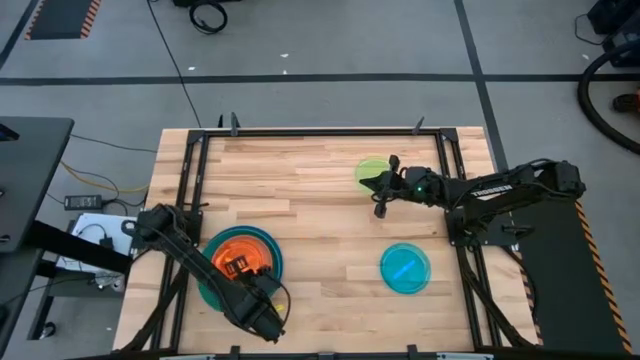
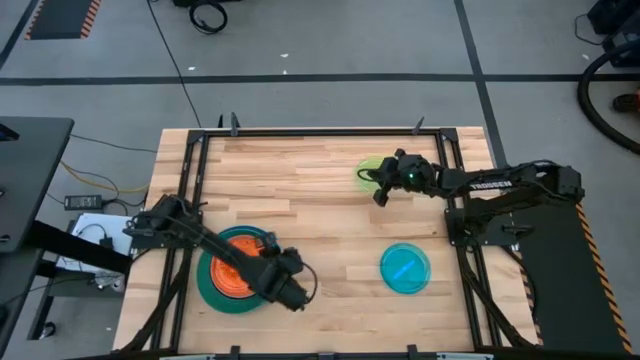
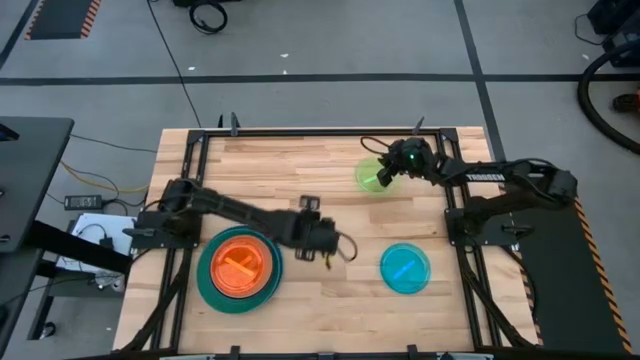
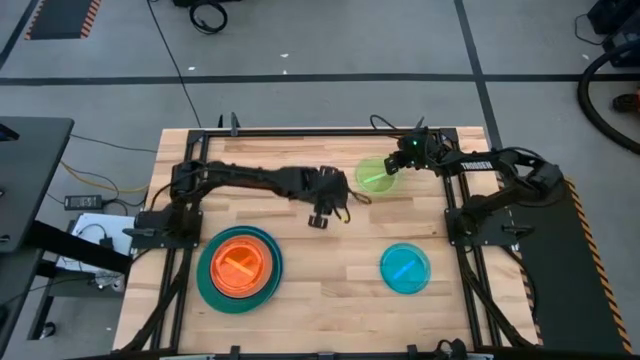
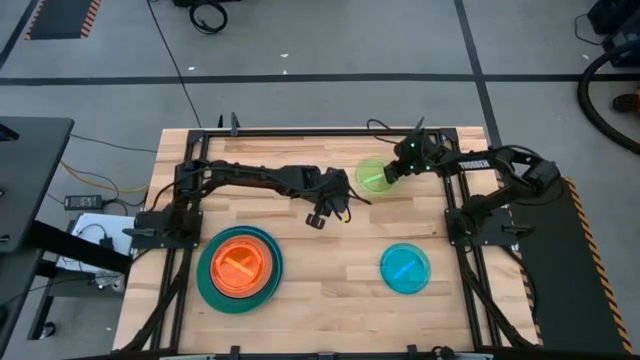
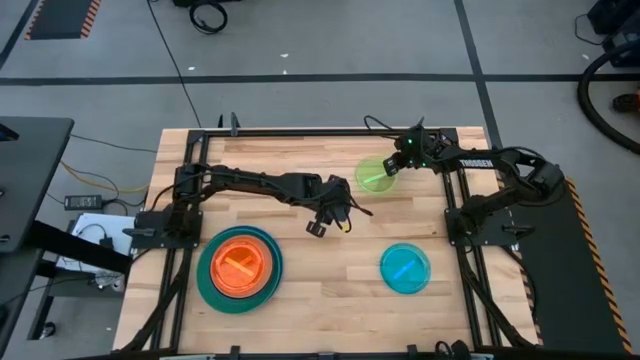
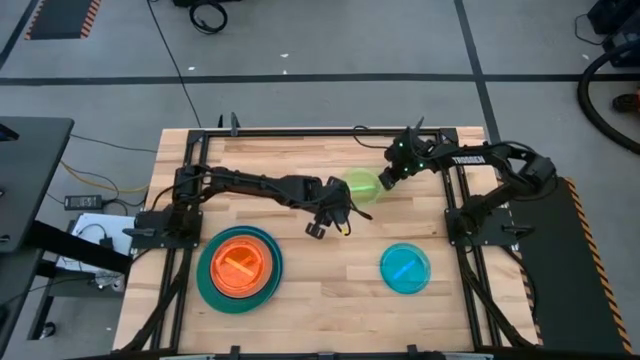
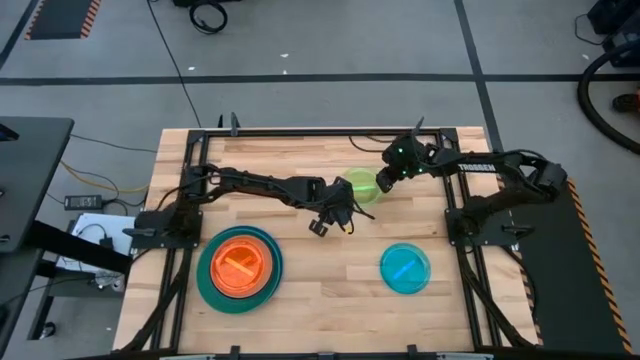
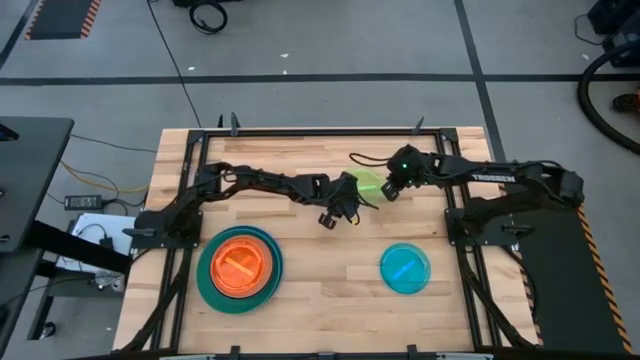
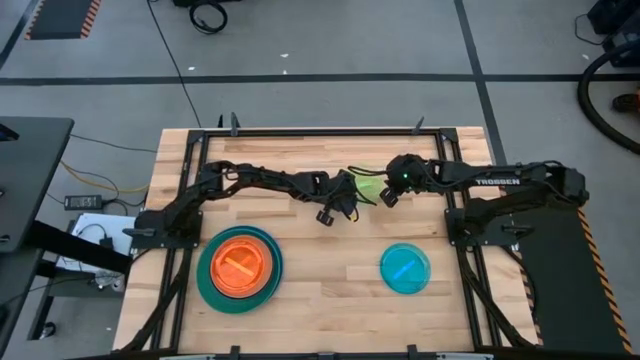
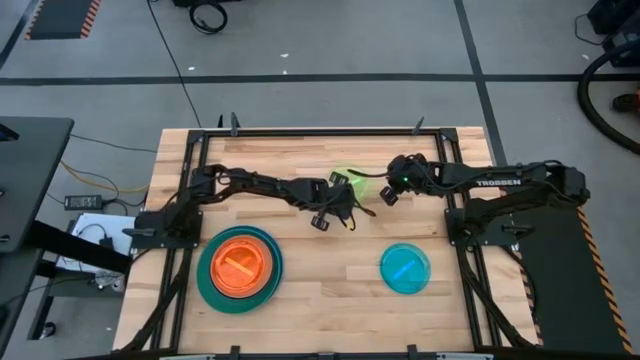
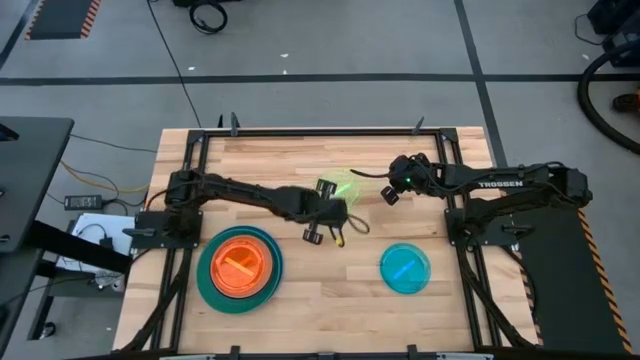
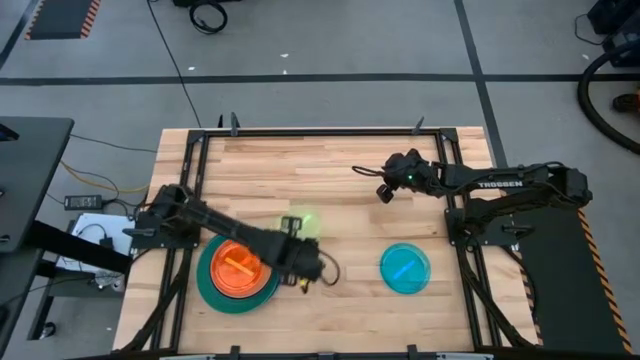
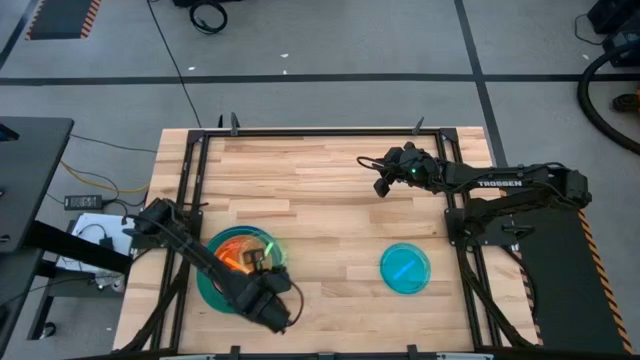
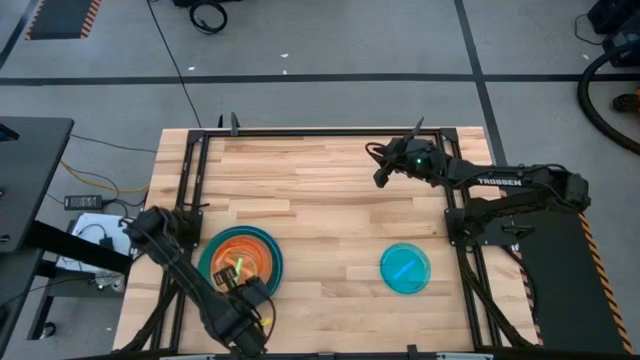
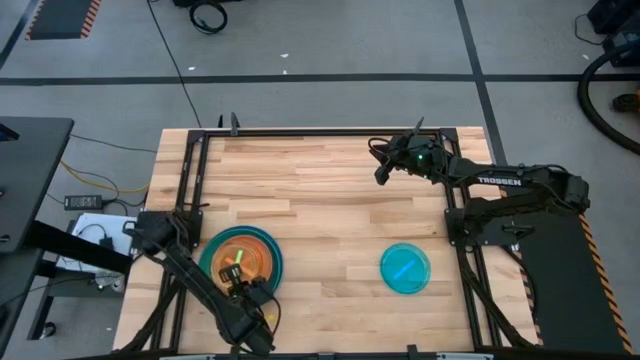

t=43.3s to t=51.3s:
Task: Stack plastic plates
Stack the light green plate on top of the light orange plate

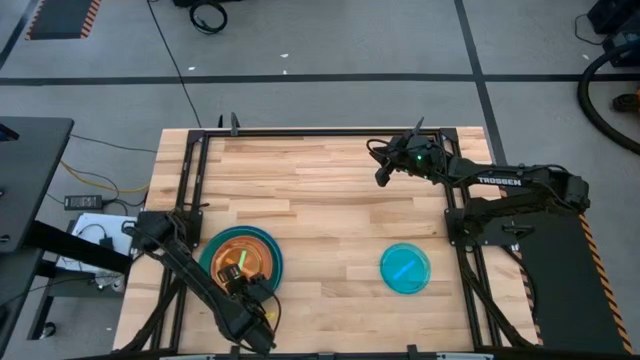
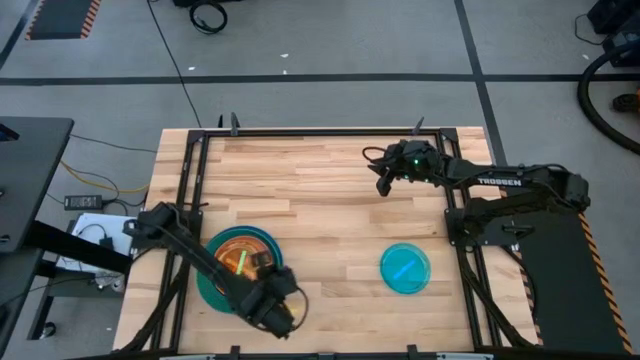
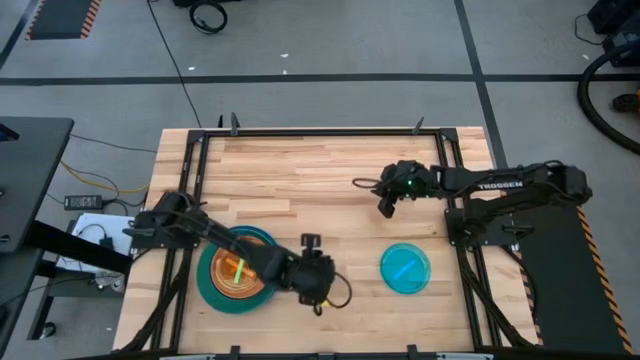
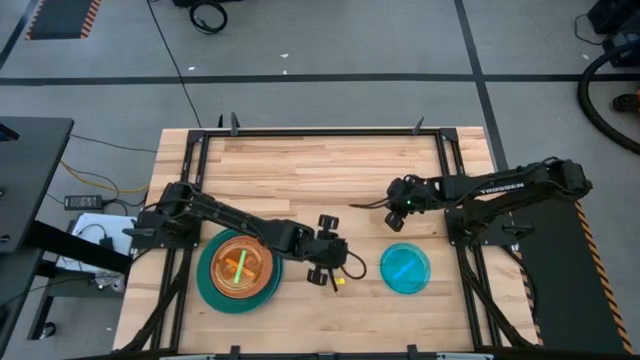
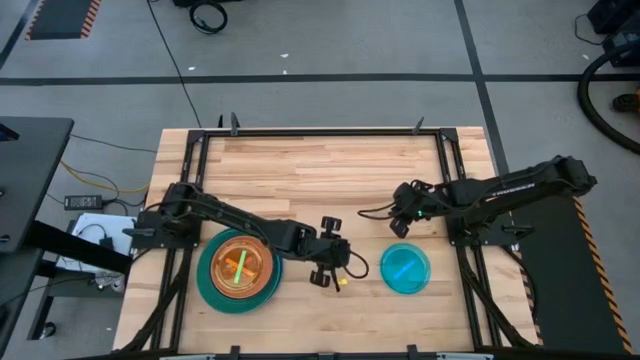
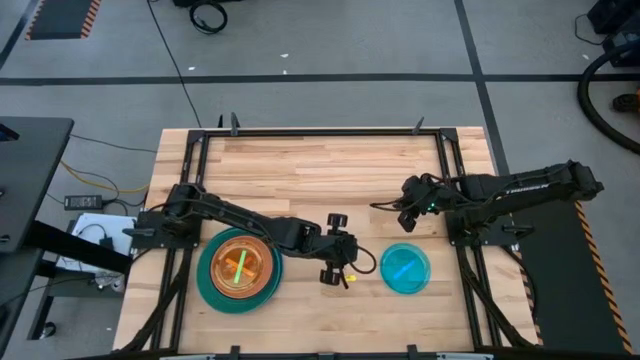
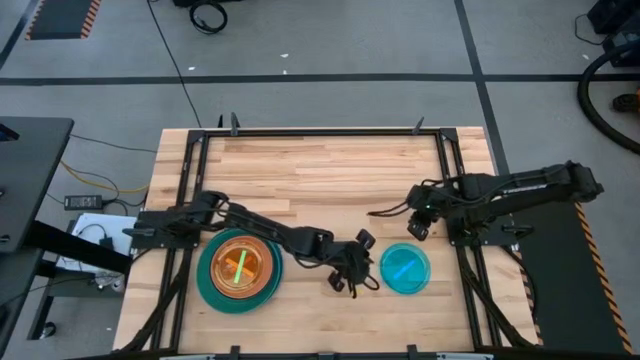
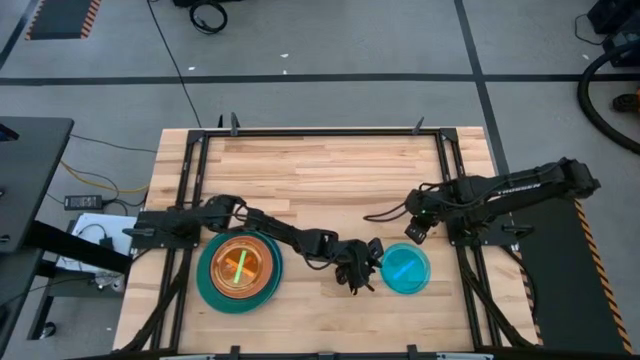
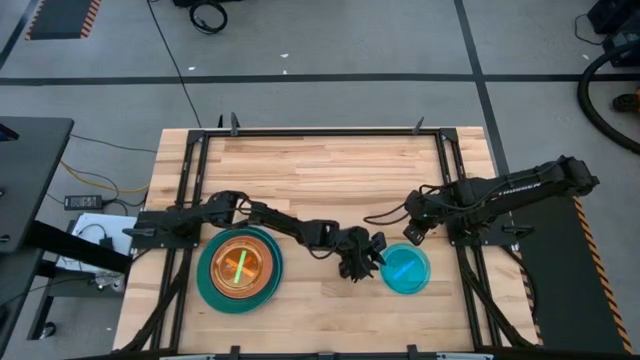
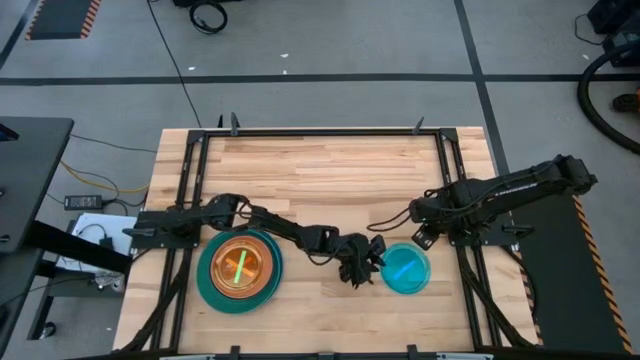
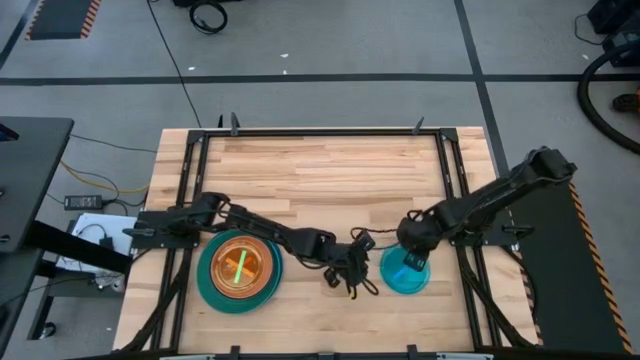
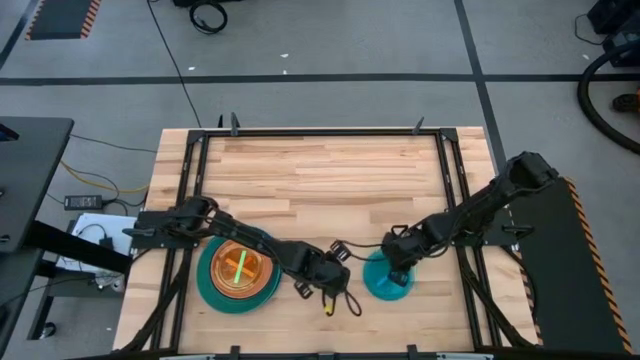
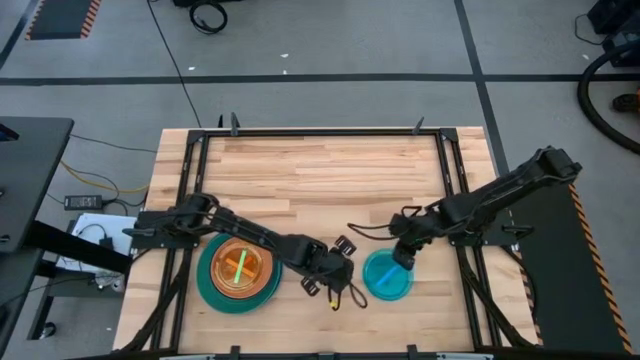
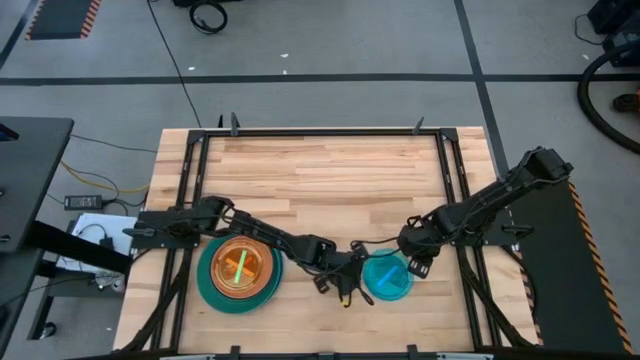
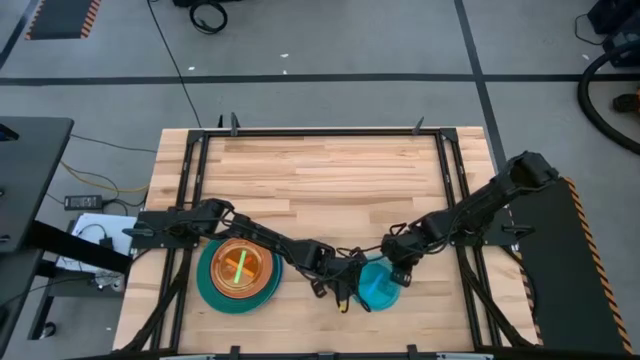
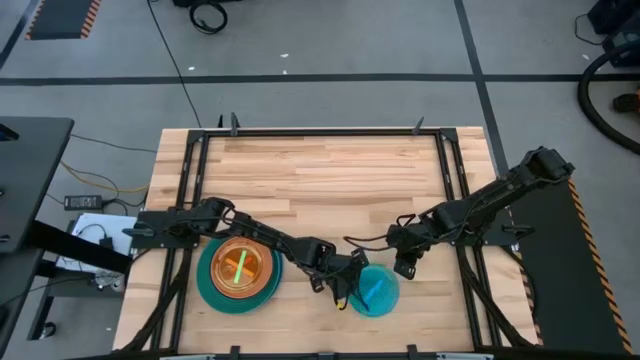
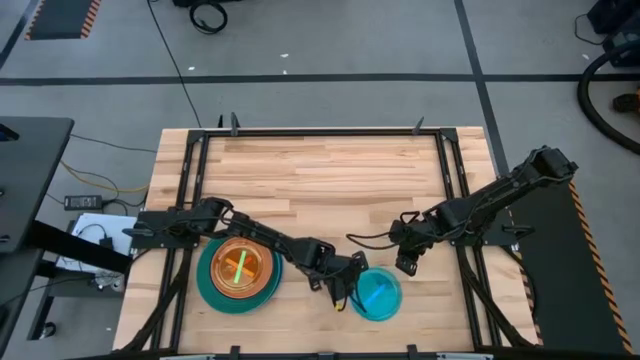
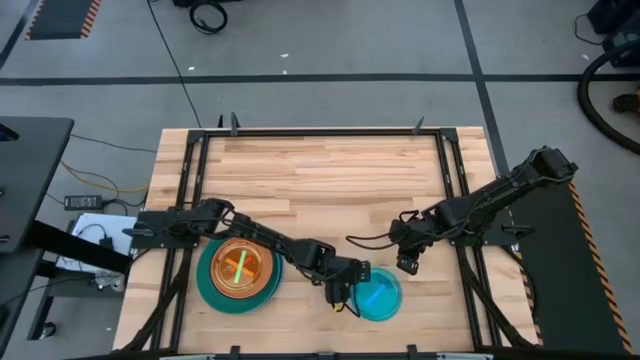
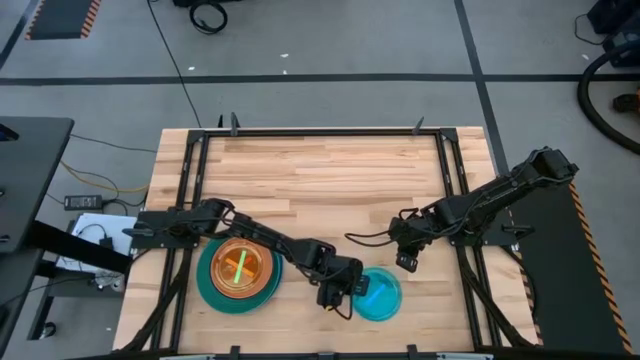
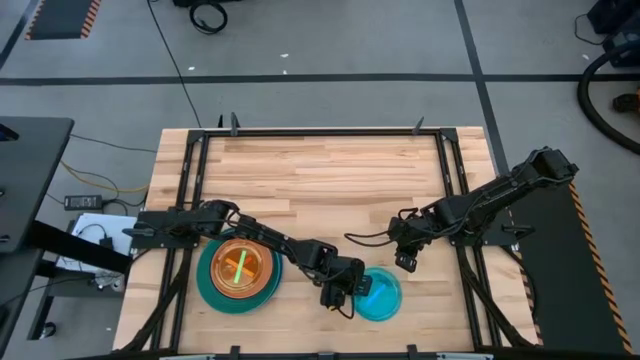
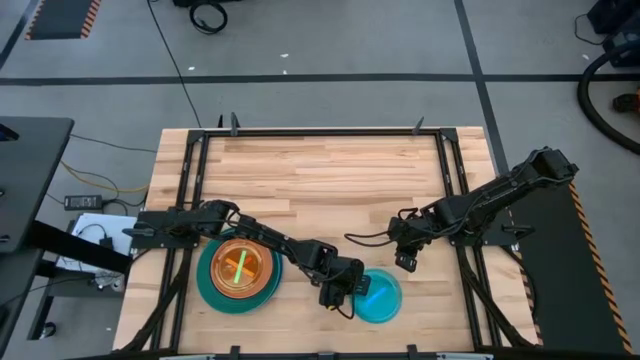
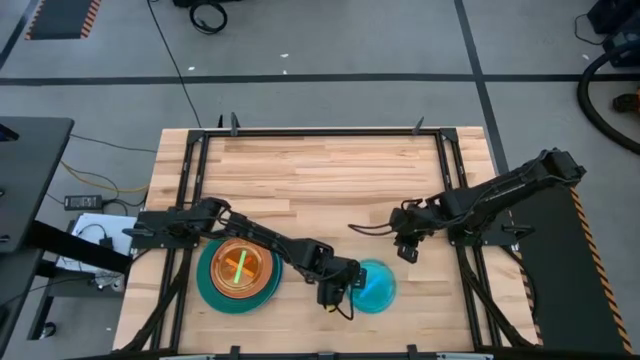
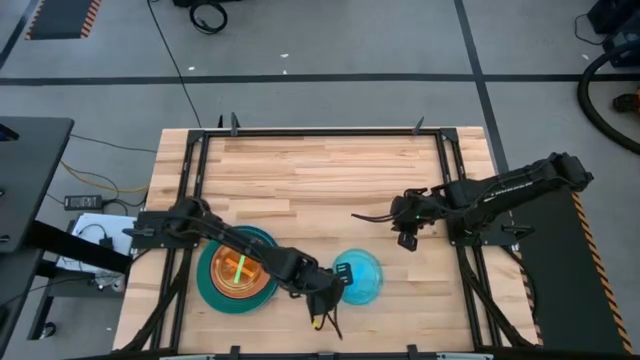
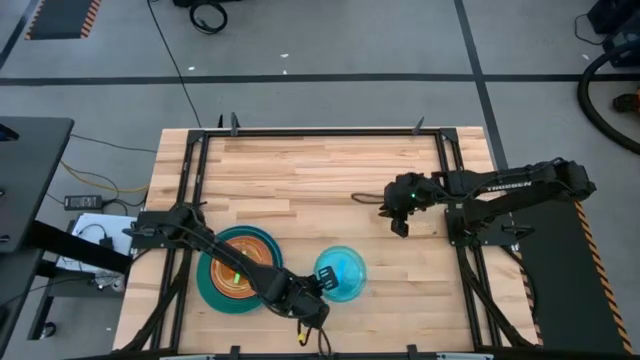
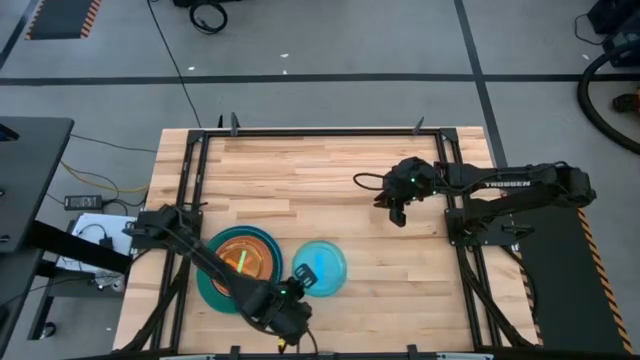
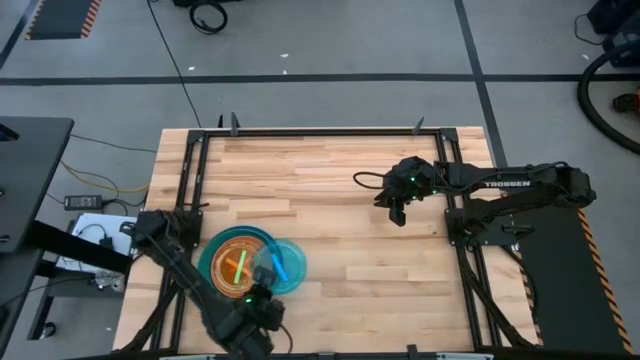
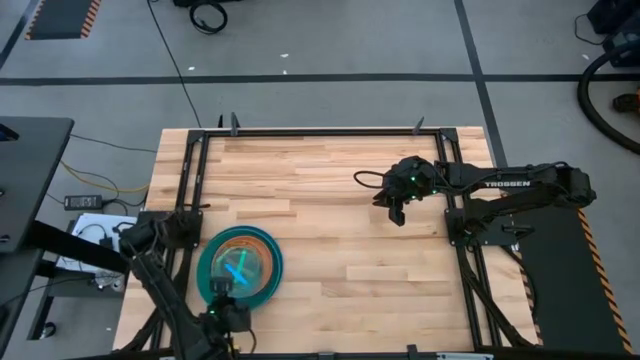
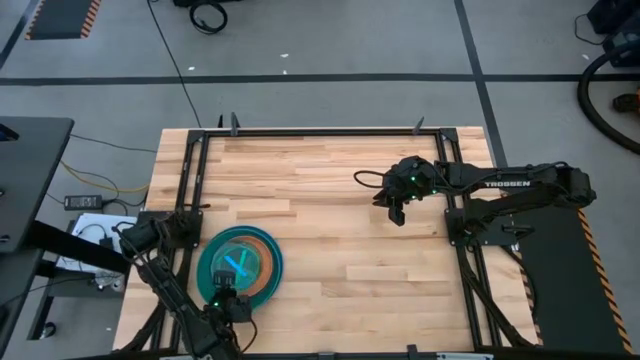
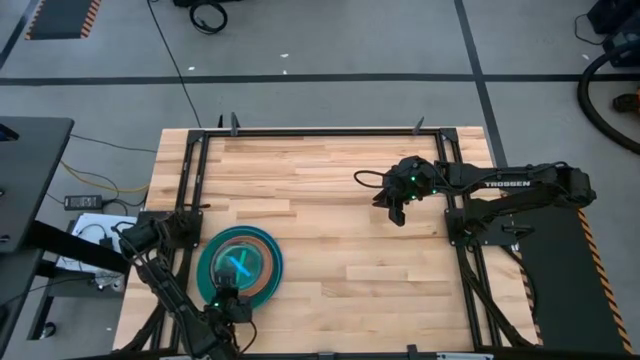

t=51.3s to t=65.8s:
Stack the light blue plate on top of the light green plate
